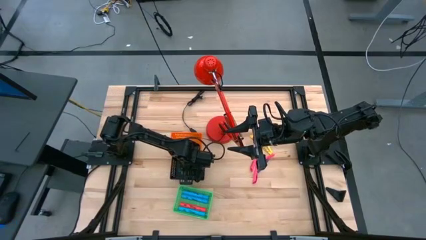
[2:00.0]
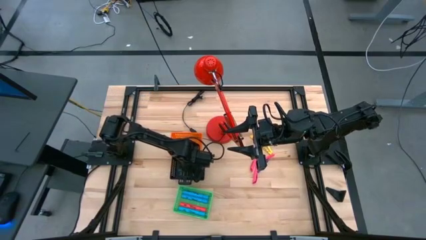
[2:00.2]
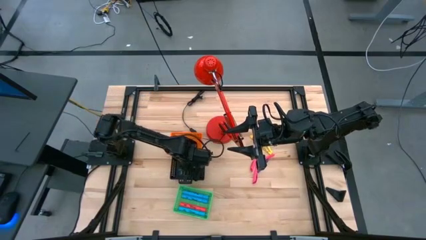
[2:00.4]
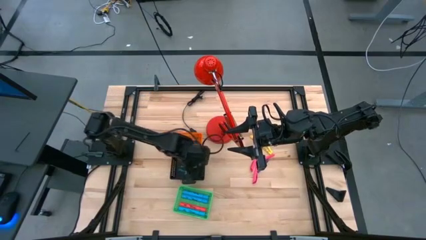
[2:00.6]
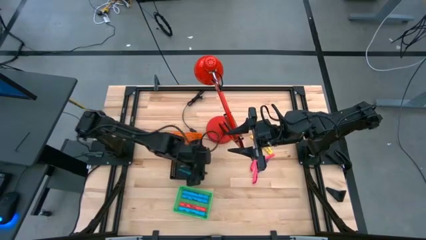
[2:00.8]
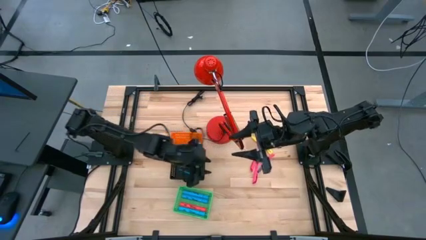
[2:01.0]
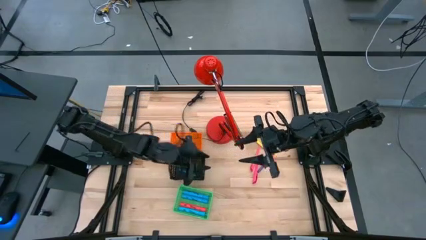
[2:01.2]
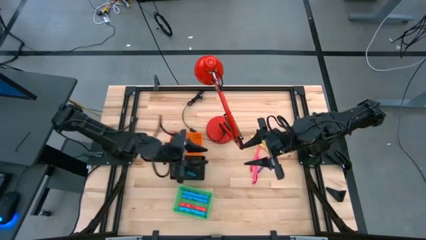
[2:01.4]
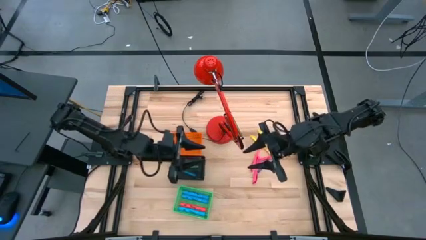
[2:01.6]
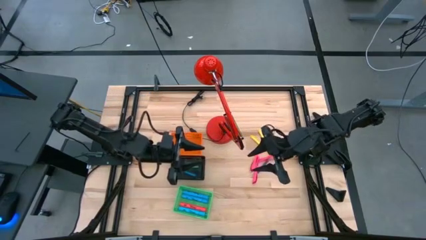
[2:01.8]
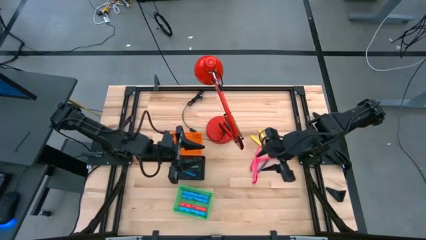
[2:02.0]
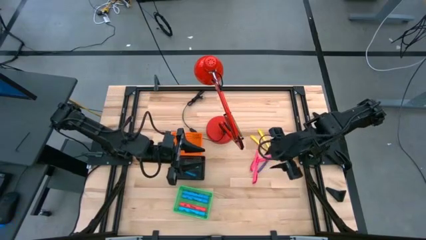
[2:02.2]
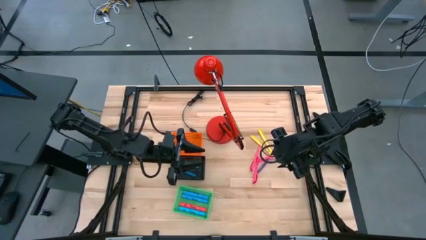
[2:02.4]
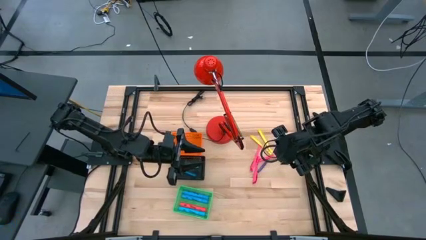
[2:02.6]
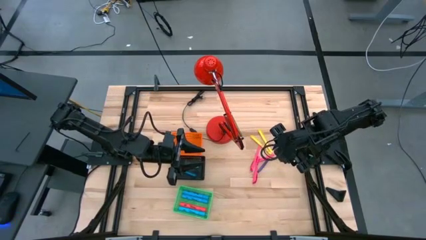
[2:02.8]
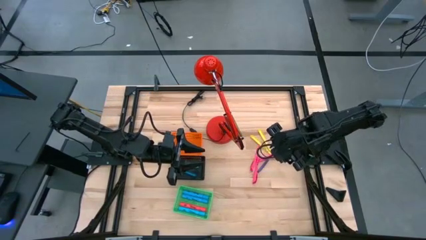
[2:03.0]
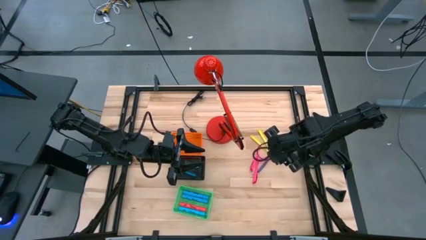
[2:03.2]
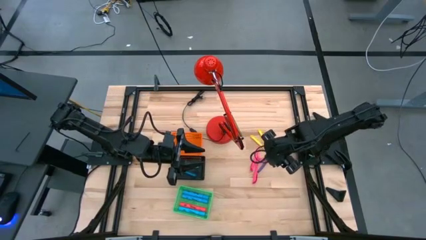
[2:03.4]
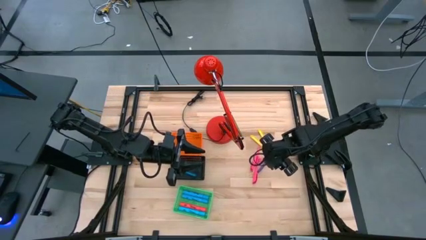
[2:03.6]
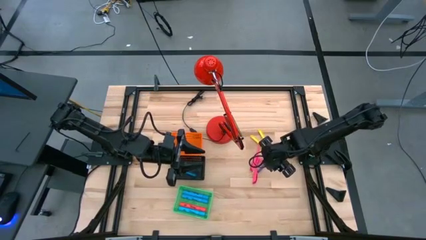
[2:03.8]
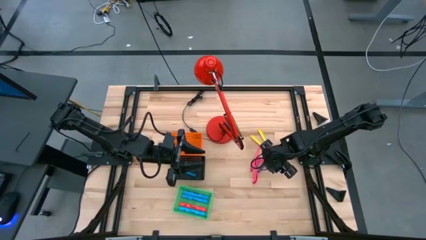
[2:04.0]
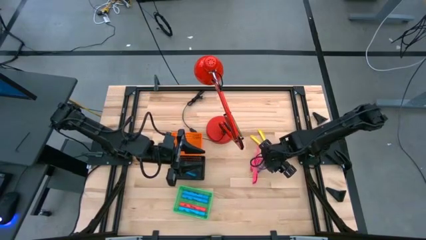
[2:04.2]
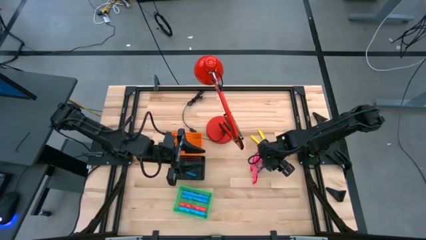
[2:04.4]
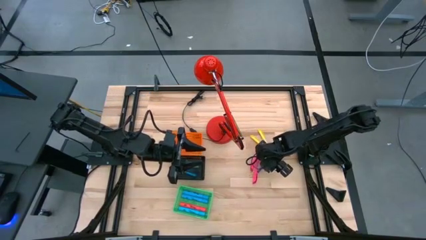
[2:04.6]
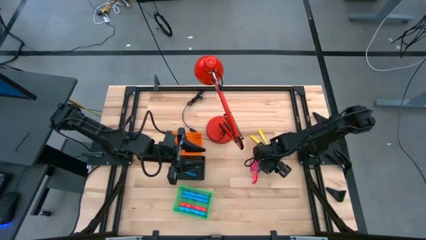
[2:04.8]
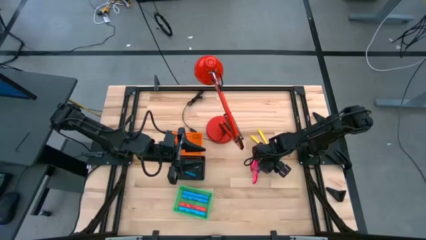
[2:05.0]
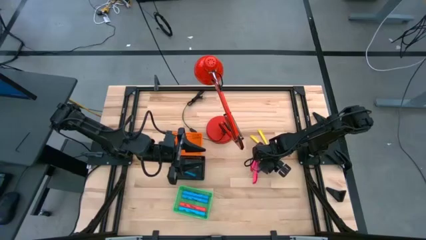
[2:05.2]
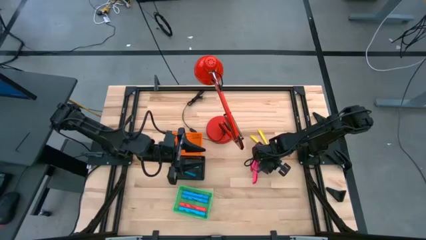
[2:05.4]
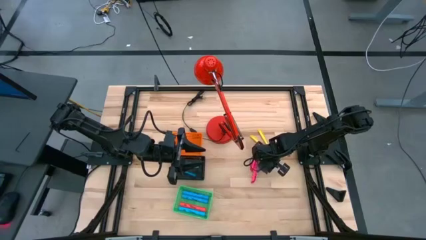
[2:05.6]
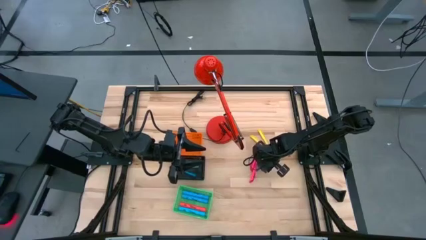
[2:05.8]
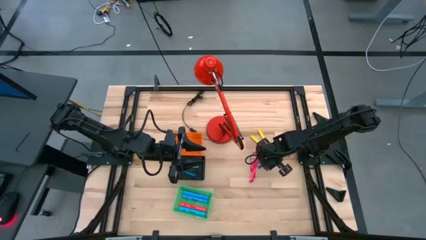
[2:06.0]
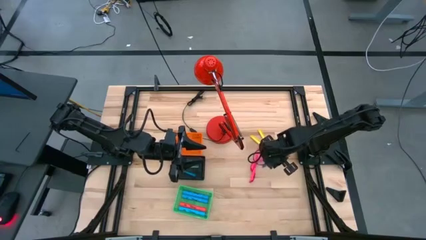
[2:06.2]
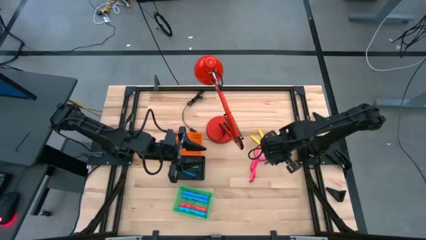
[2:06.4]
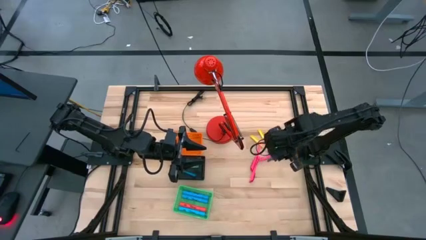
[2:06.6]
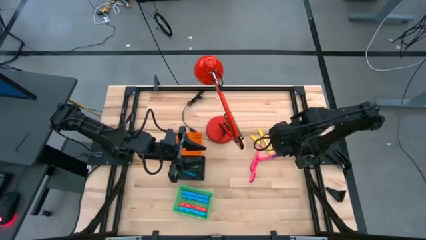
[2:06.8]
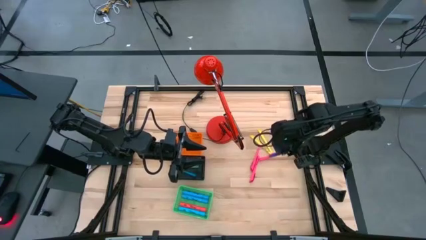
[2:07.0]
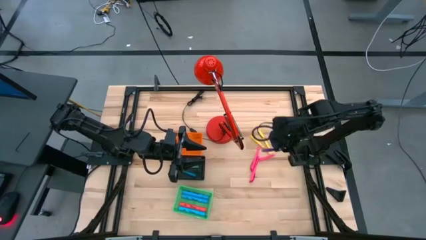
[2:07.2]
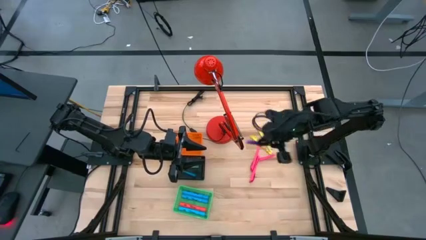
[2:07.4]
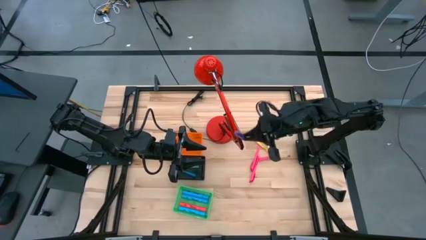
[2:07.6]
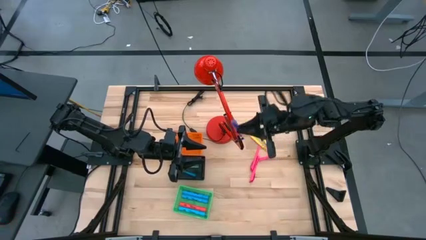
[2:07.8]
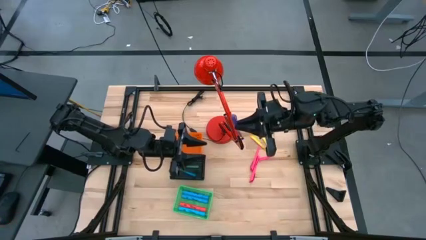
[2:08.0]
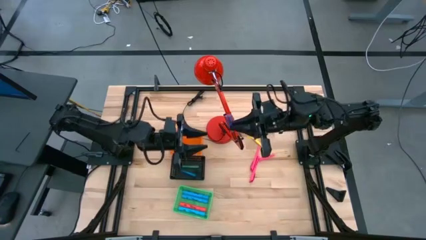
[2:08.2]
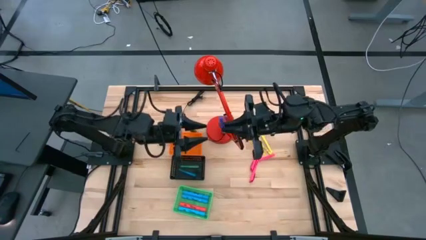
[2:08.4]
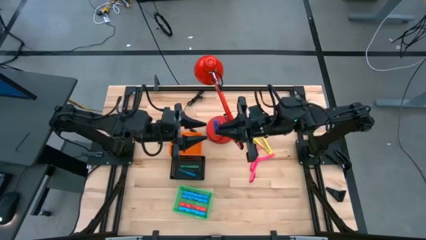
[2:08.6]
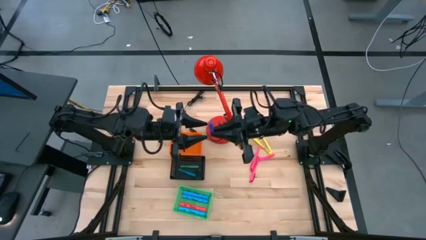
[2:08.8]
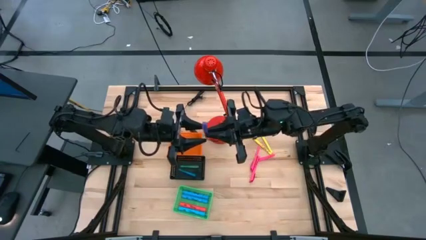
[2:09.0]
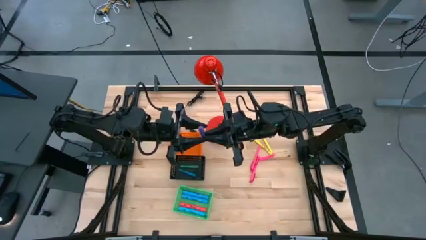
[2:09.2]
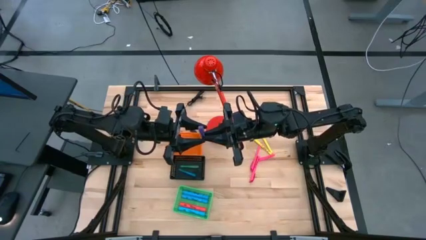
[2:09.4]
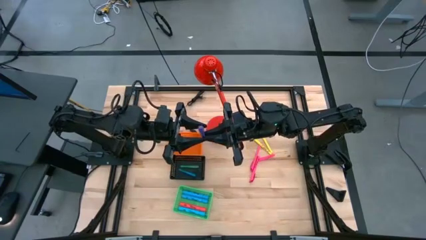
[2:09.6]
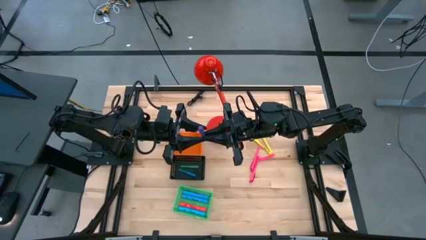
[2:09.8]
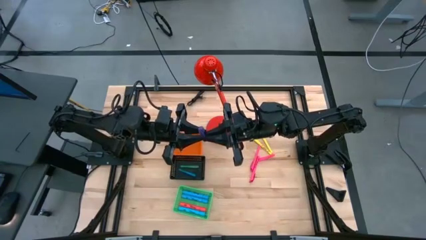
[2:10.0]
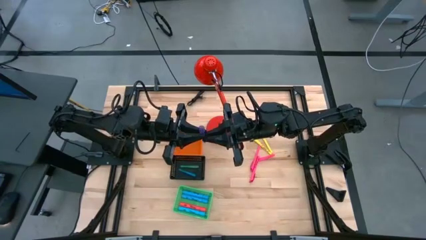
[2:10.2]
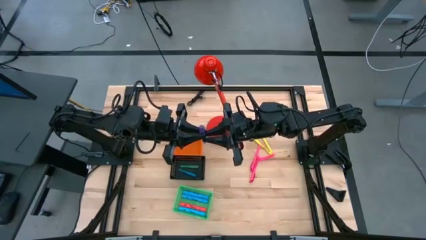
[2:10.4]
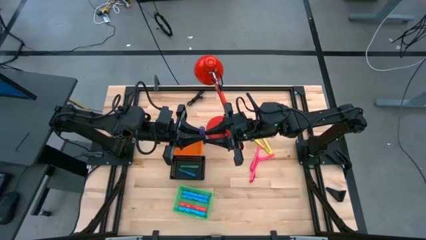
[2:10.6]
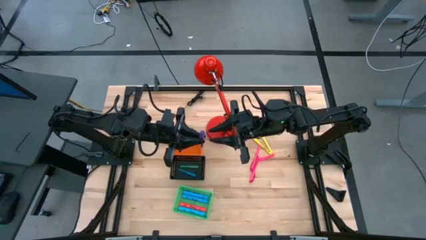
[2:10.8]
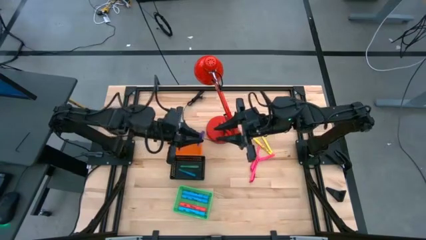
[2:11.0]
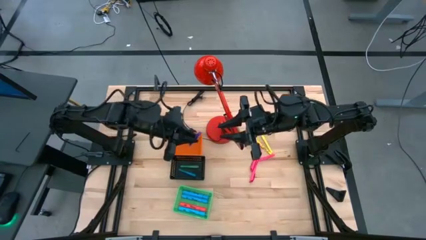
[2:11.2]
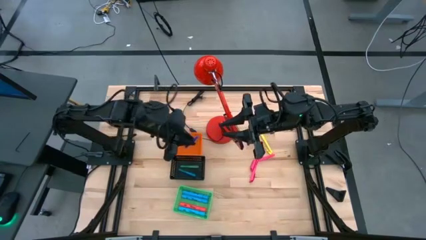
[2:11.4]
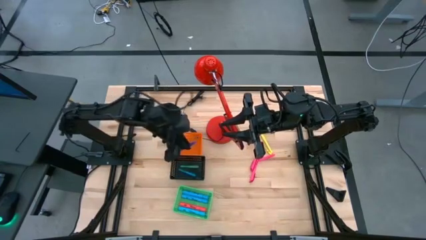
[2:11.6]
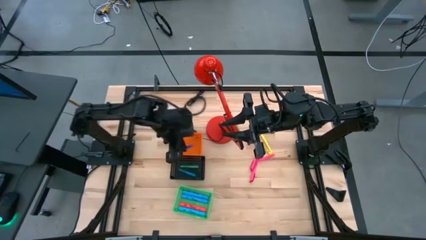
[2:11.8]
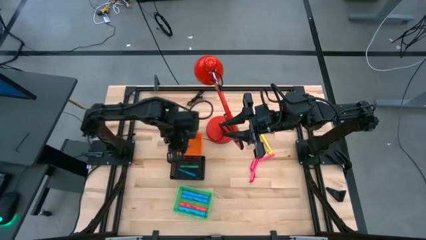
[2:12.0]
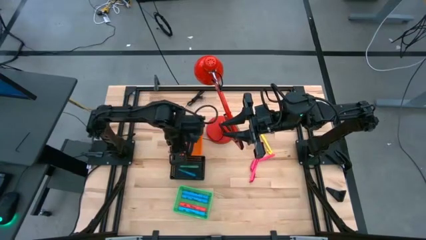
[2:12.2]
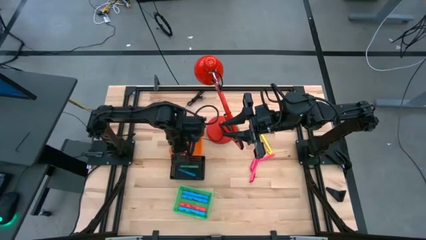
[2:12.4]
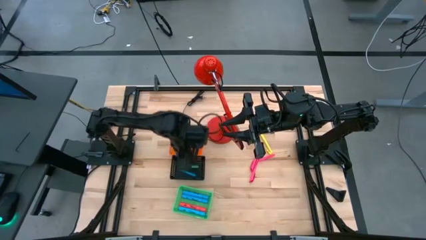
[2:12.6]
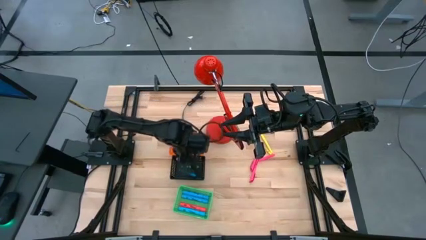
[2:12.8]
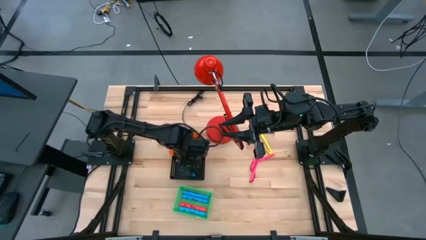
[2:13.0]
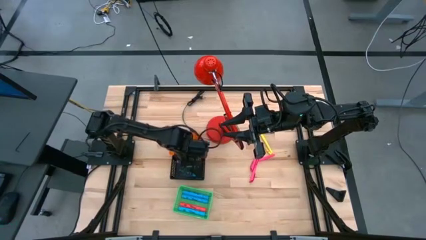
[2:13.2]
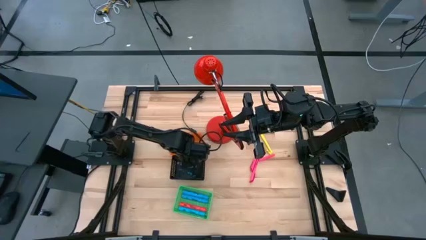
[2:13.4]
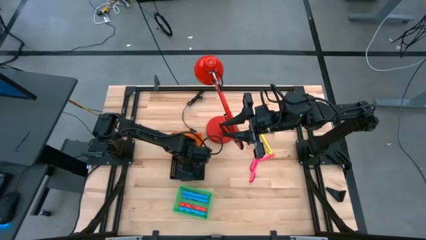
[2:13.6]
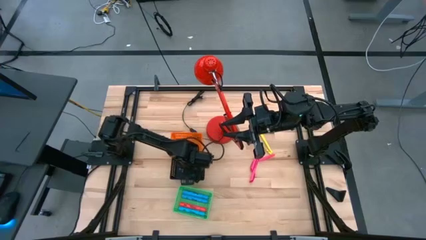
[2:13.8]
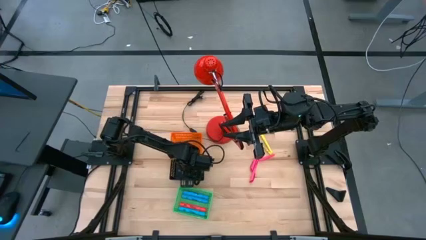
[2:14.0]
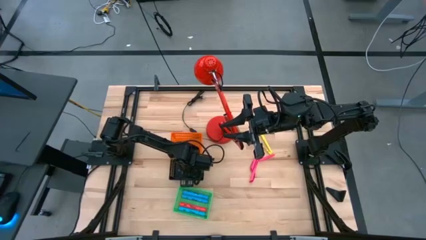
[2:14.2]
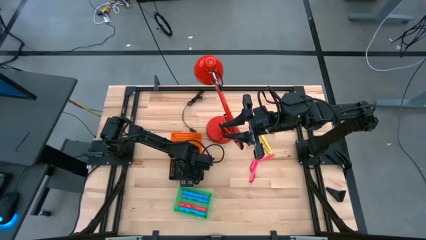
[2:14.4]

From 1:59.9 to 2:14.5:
Task: Pick & Place Markers
Put the purple pen into the black bin
